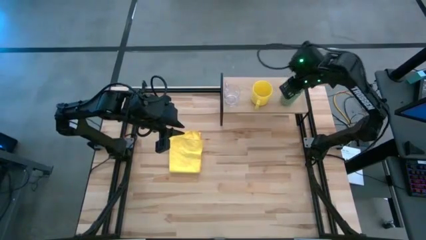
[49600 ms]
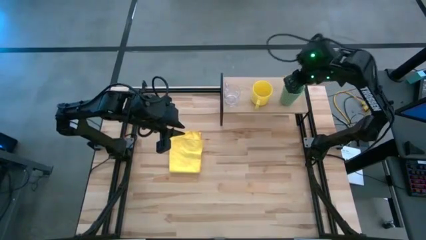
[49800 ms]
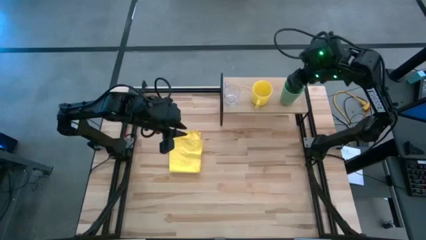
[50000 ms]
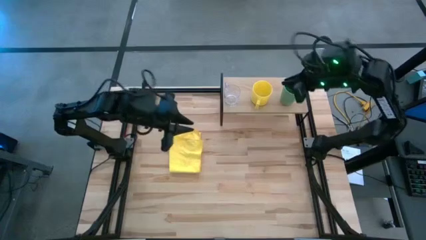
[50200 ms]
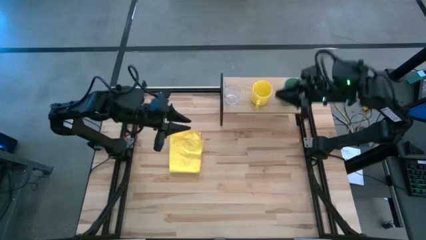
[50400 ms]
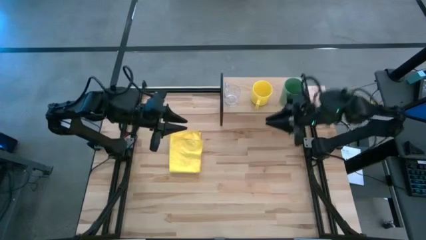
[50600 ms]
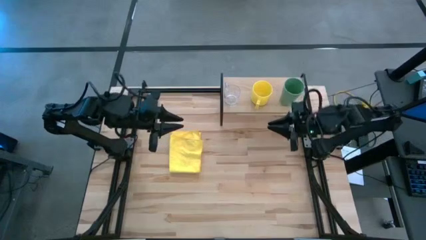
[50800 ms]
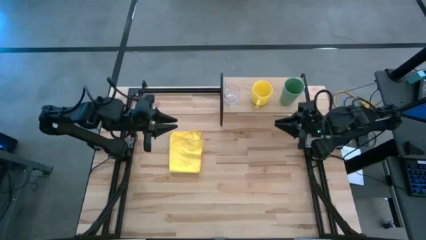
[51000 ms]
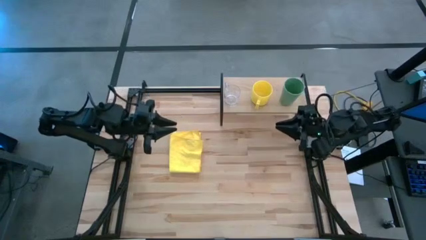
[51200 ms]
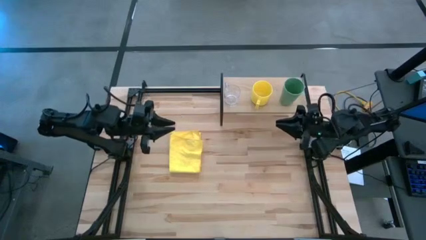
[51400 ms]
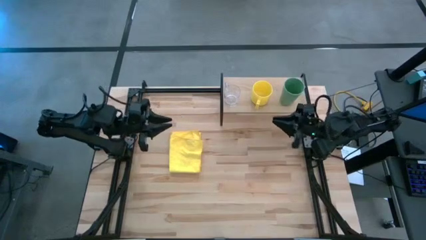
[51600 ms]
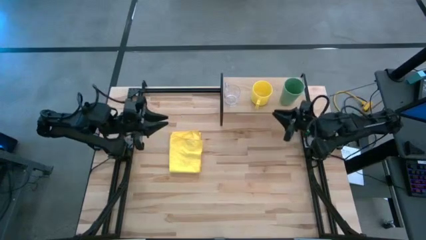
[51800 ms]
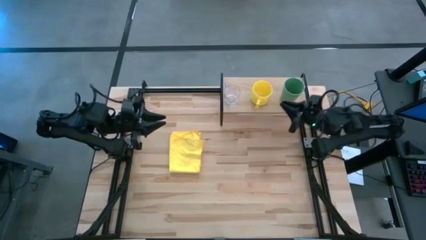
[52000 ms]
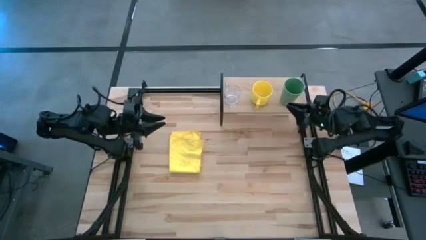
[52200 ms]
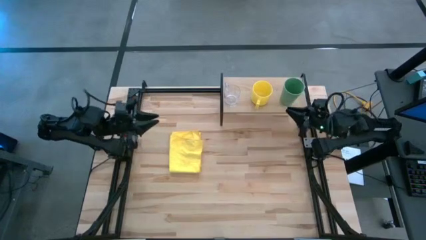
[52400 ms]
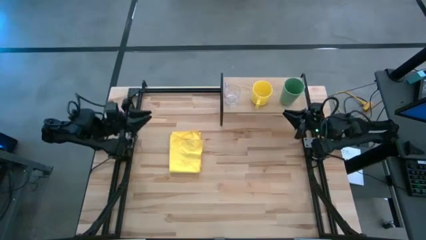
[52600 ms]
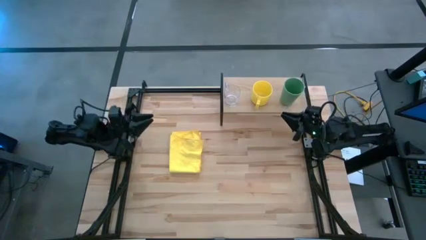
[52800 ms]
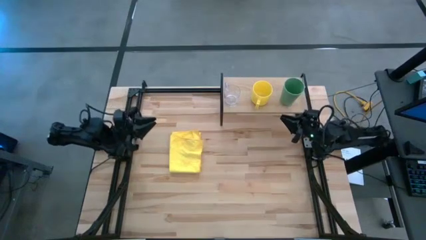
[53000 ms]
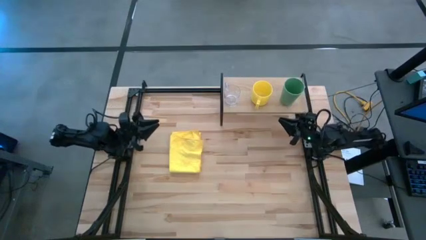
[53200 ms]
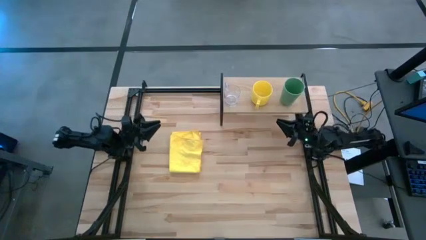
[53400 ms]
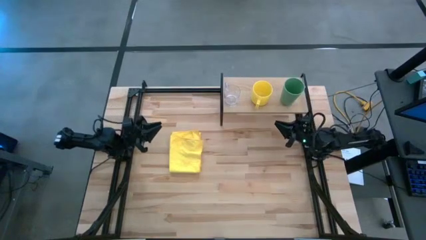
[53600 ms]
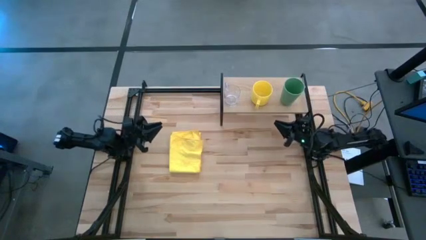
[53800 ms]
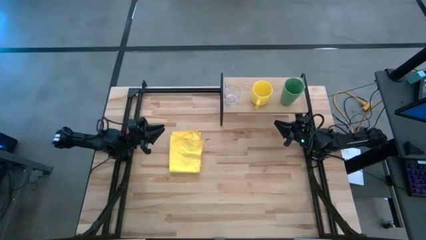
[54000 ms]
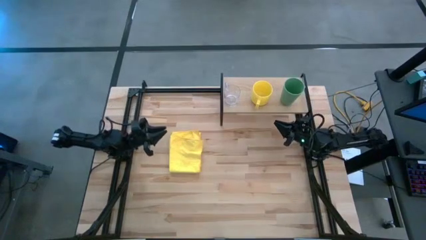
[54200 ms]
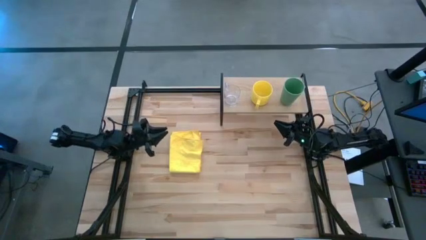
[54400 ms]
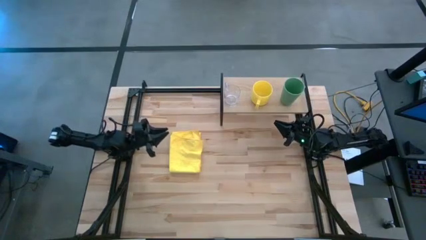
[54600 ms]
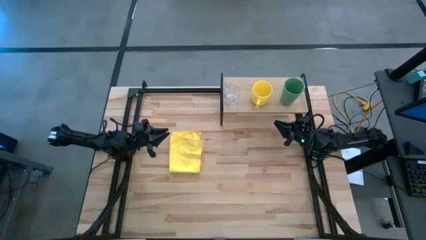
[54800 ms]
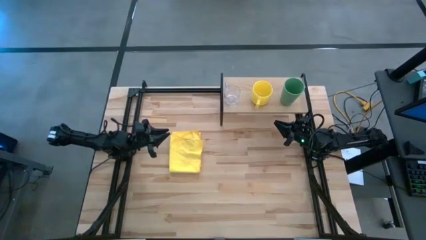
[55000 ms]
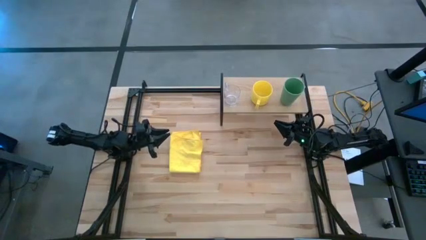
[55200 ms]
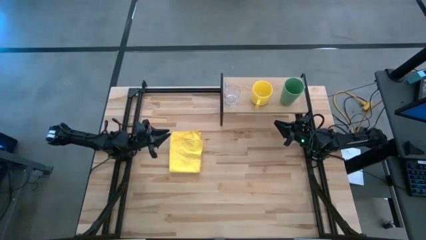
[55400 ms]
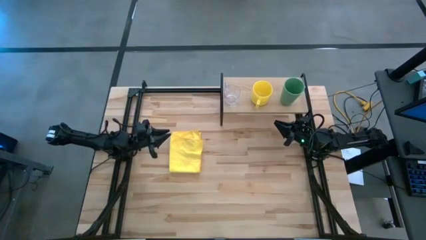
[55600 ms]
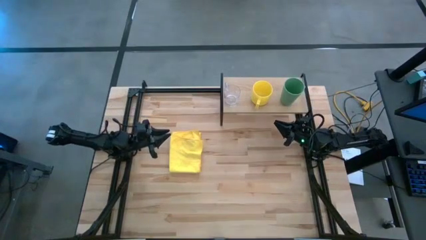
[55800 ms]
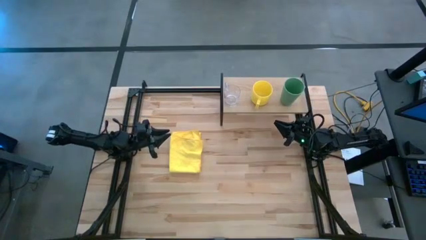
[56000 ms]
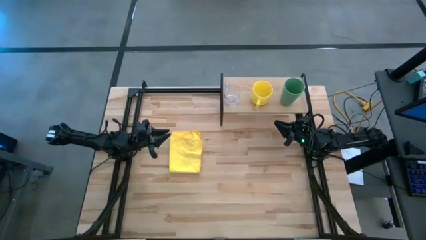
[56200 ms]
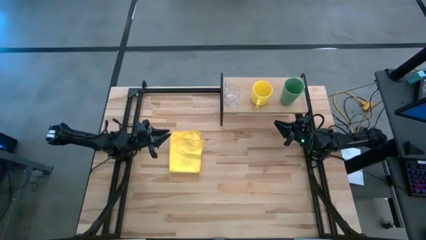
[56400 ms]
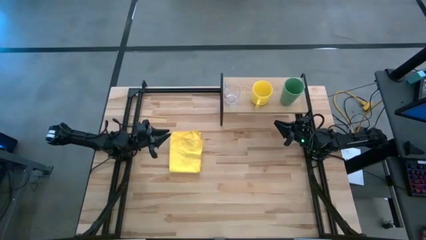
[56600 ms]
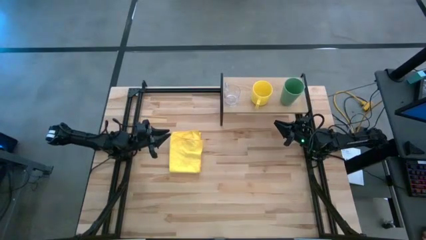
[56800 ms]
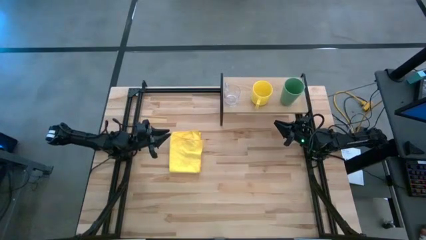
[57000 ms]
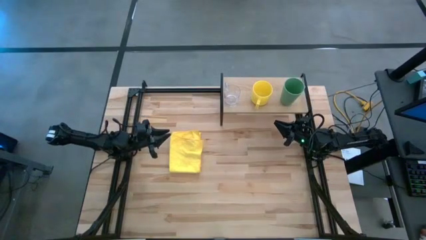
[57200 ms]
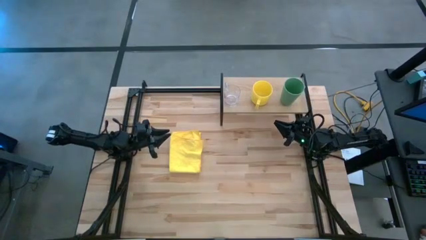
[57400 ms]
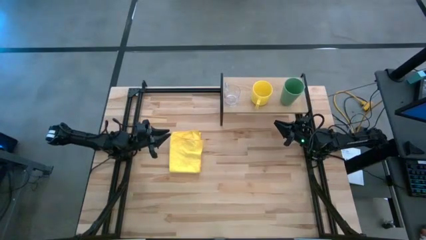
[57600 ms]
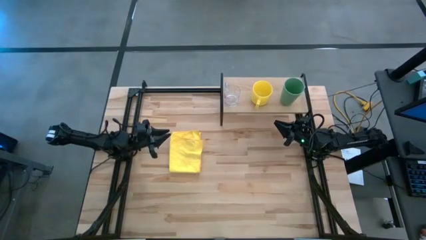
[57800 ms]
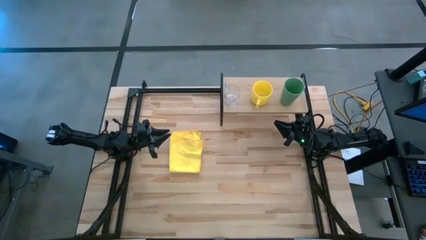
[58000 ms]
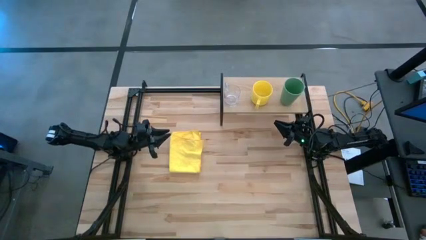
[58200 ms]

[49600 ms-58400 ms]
Task: Stack small to large cups/mugs on shelf
Return to Home Position

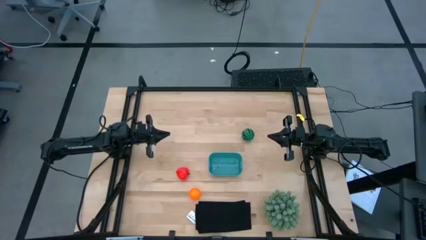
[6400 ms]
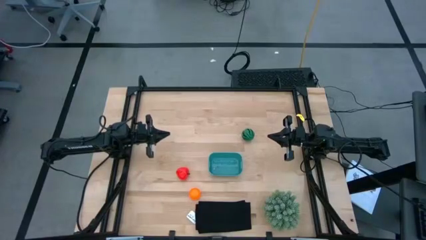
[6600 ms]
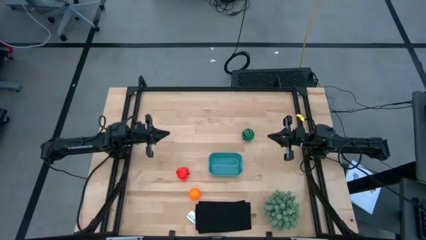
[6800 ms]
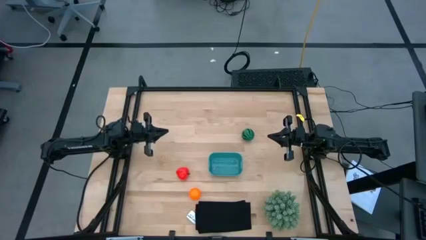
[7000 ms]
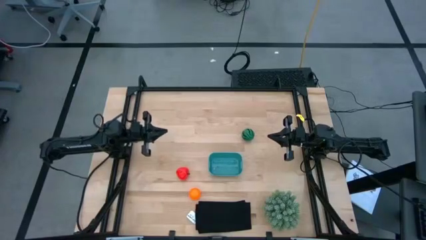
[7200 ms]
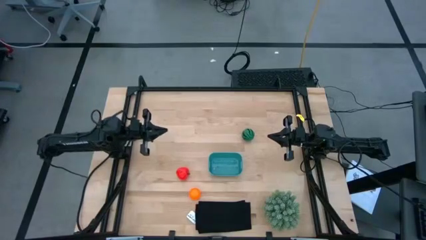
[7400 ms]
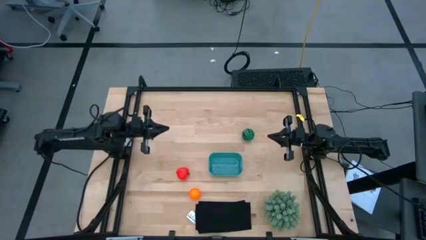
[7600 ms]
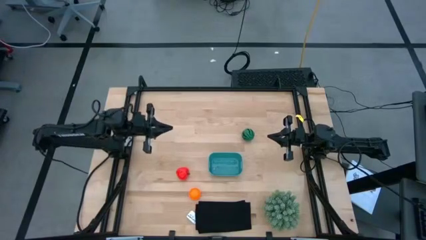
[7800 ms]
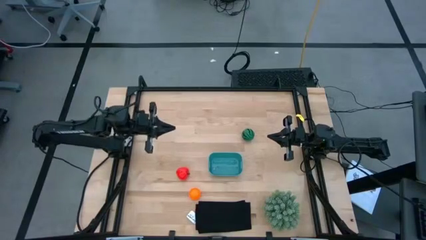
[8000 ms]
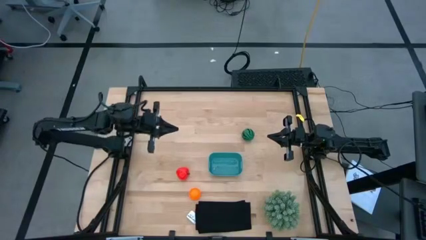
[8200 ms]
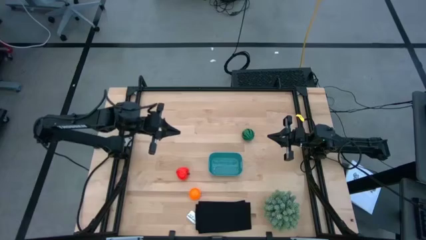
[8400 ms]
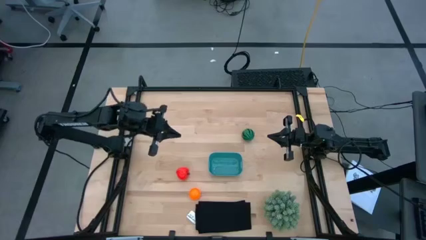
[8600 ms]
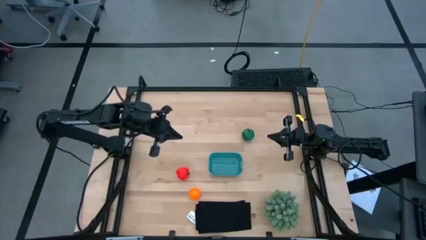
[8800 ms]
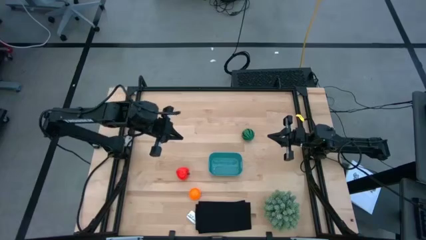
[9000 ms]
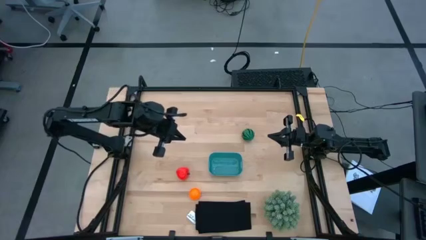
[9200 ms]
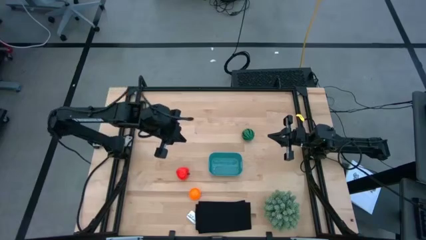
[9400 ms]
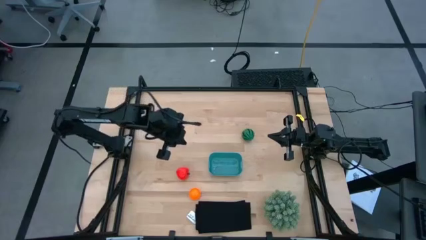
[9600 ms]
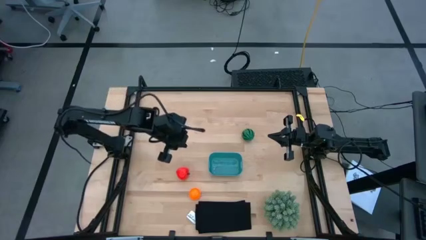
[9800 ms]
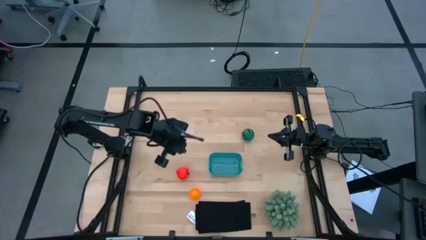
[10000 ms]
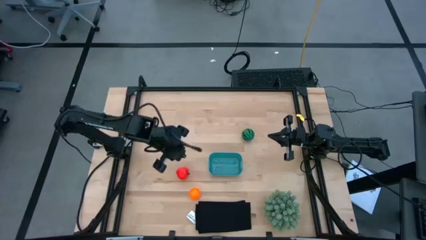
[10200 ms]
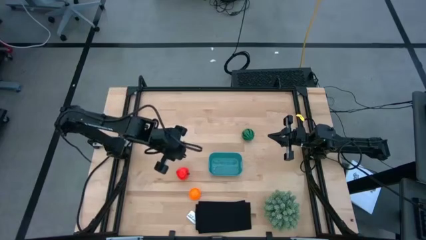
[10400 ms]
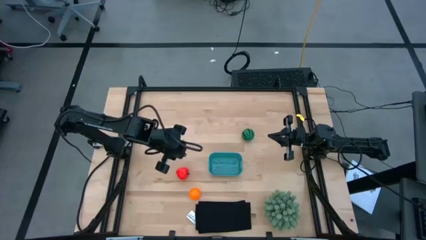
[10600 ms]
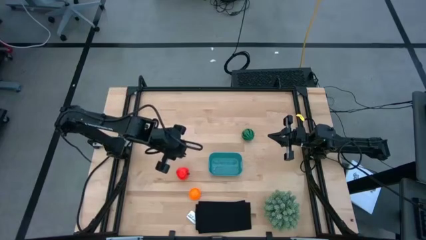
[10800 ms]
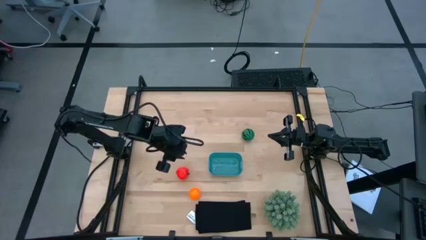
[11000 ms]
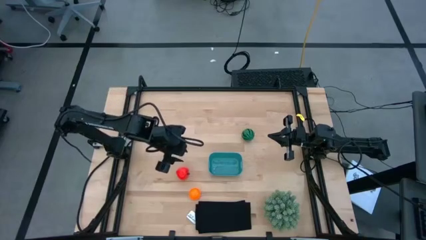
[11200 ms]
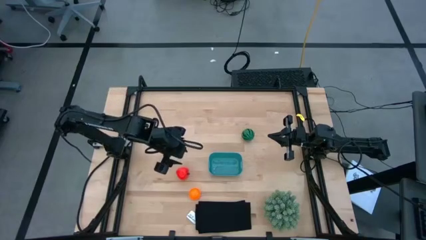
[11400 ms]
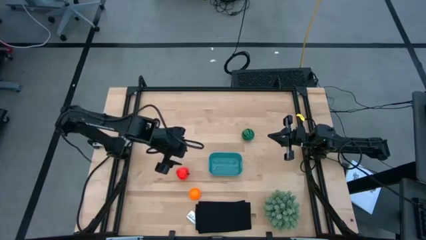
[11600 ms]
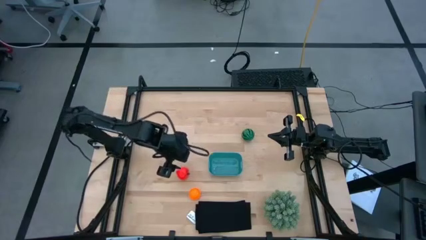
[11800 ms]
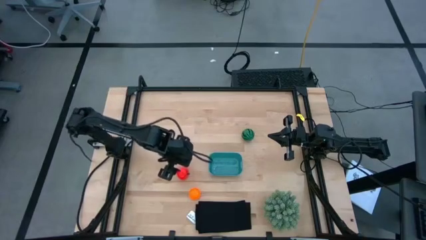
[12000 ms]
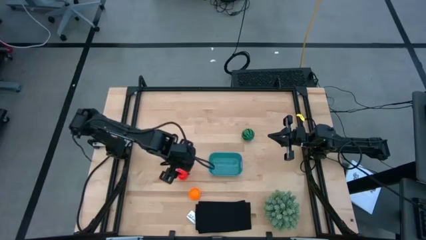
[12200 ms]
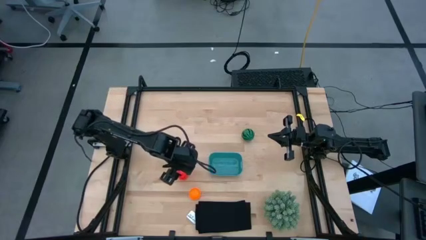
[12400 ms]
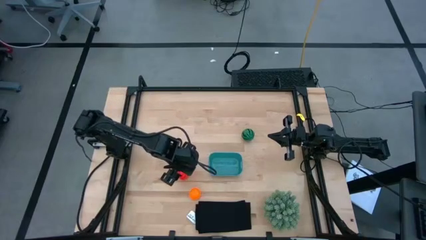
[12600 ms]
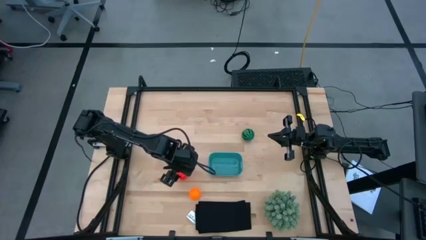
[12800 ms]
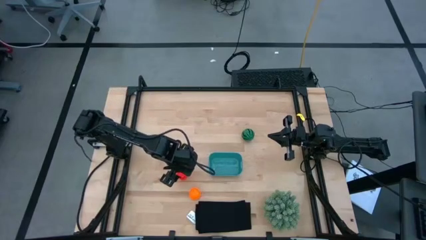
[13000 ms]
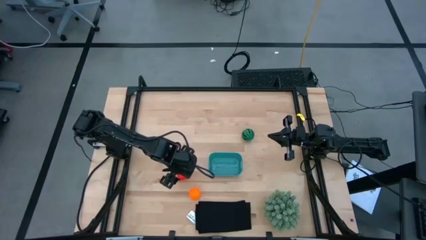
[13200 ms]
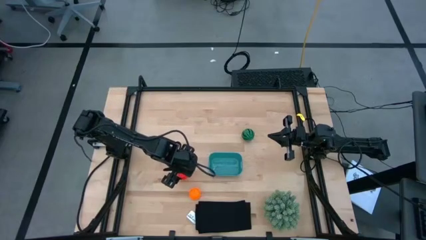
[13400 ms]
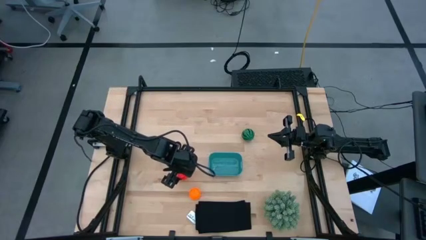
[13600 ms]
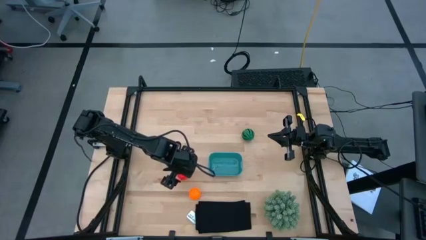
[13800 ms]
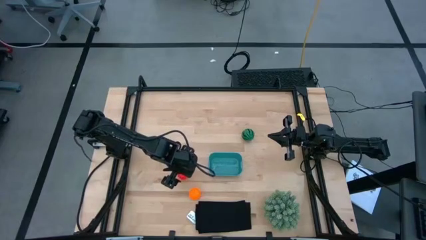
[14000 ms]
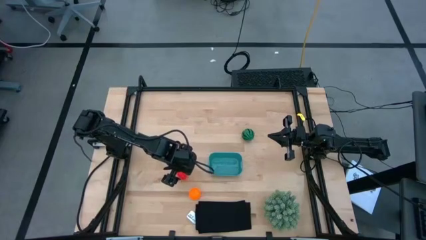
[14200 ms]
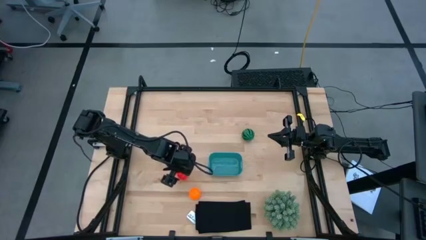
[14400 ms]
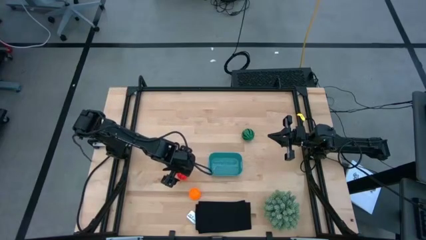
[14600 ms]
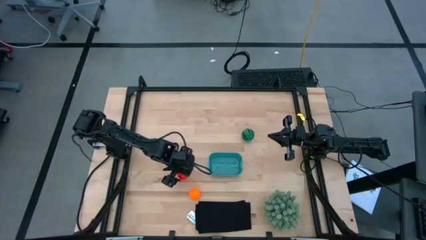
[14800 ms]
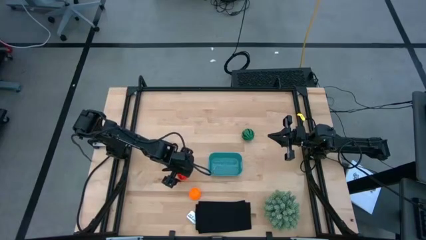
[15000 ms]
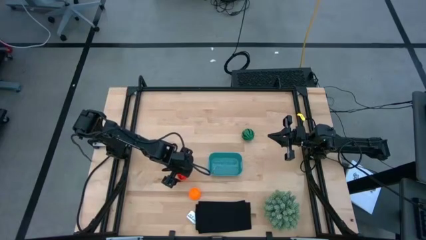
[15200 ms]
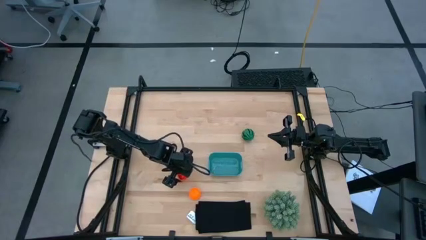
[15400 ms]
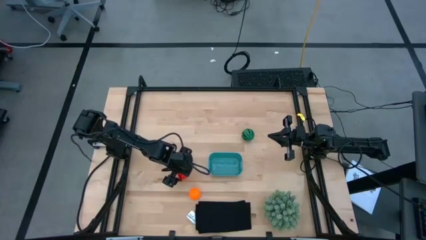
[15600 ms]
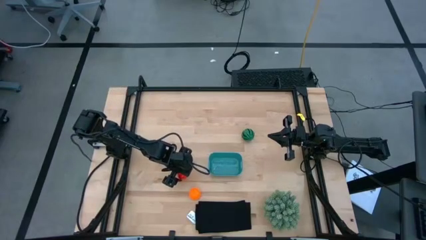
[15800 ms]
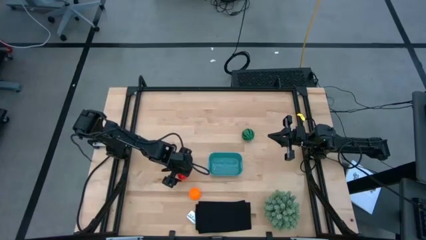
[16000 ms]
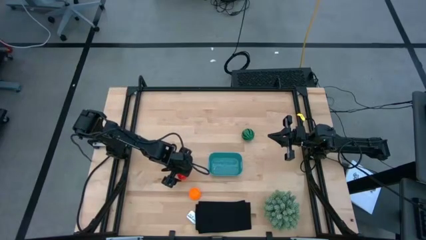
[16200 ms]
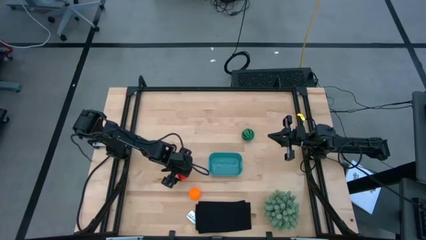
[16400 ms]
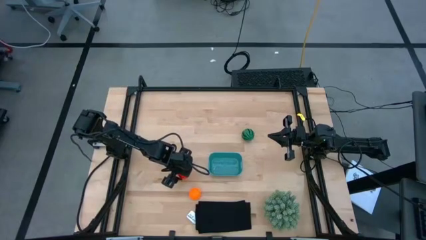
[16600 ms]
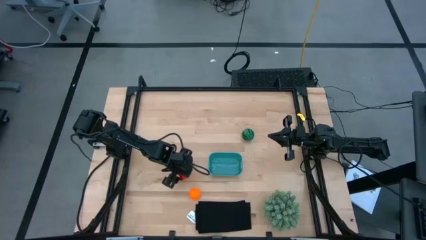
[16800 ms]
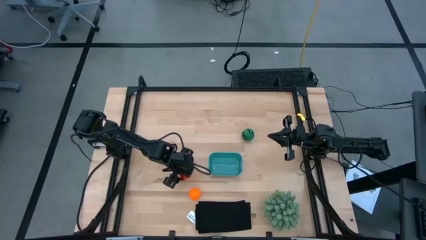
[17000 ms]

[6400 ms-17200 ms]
Task: Pick and placing Produce into tupperware
Put the red apple into the blue container
